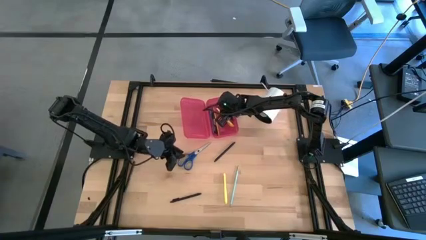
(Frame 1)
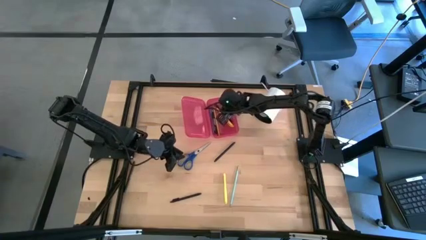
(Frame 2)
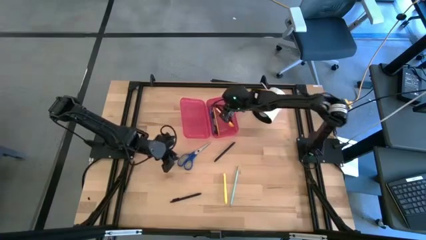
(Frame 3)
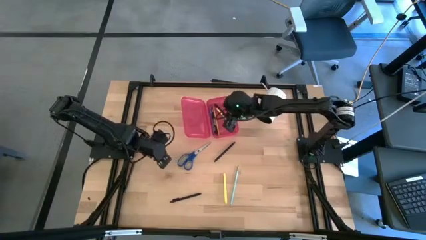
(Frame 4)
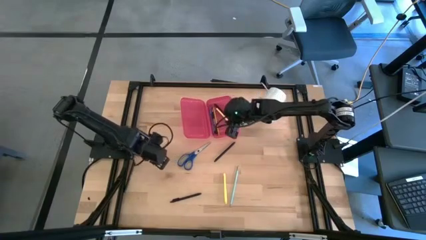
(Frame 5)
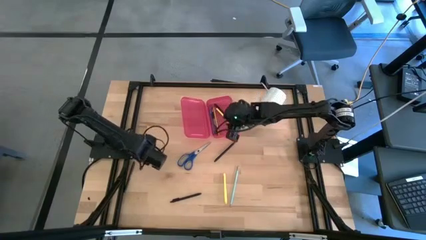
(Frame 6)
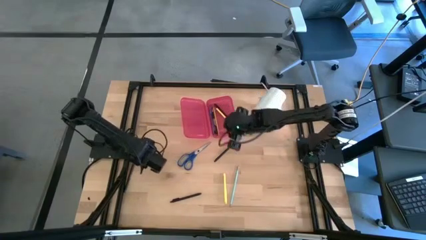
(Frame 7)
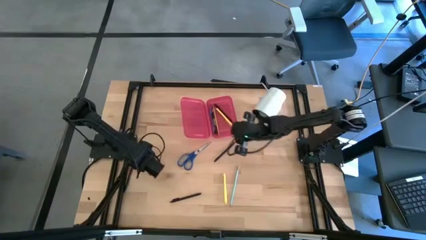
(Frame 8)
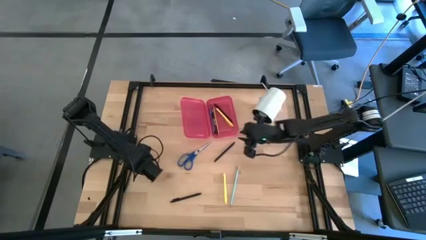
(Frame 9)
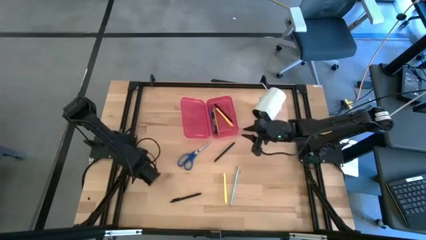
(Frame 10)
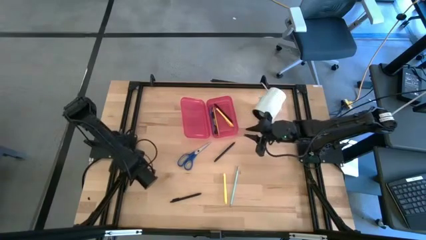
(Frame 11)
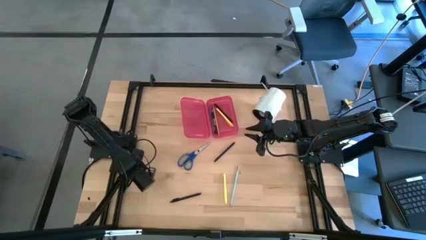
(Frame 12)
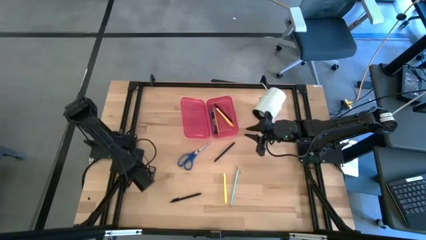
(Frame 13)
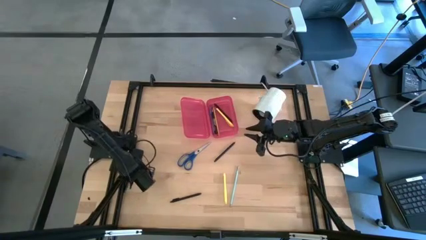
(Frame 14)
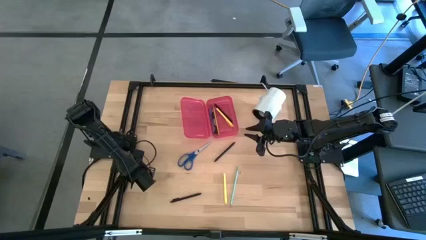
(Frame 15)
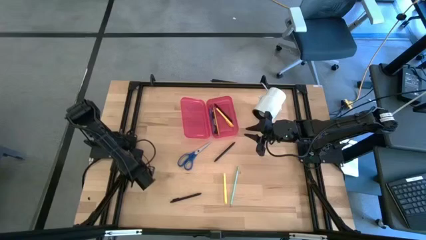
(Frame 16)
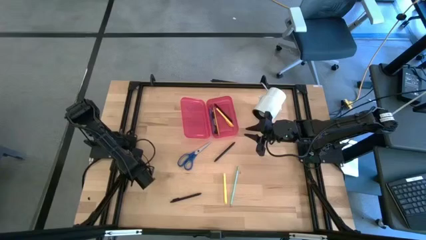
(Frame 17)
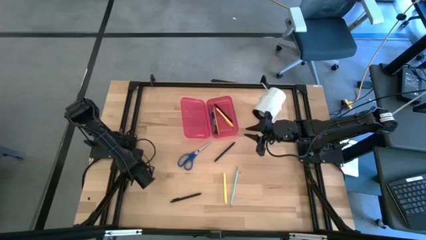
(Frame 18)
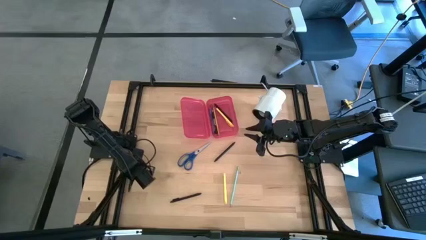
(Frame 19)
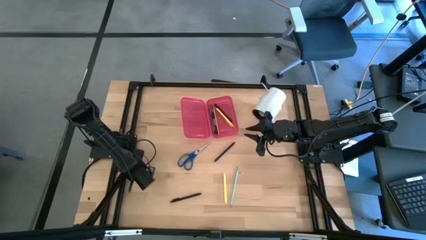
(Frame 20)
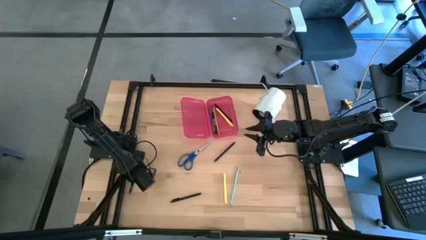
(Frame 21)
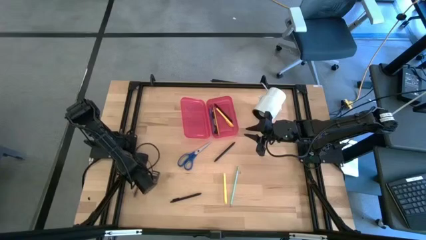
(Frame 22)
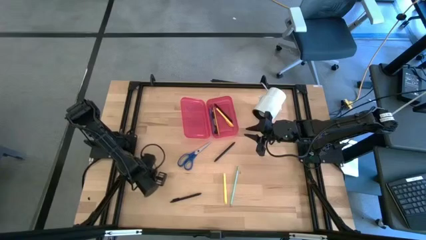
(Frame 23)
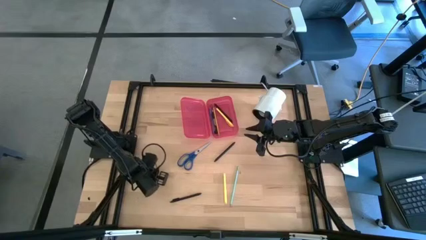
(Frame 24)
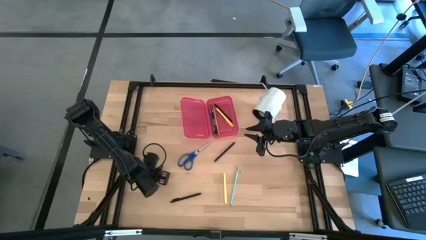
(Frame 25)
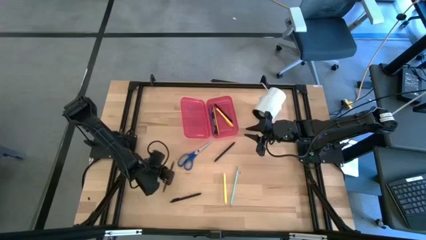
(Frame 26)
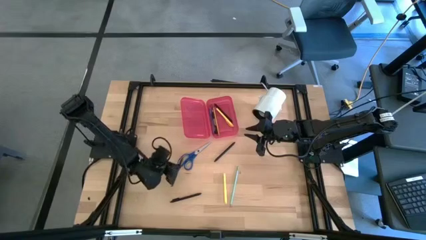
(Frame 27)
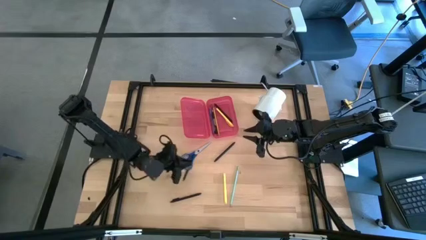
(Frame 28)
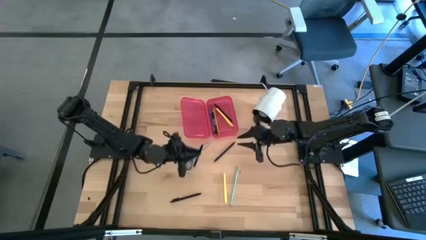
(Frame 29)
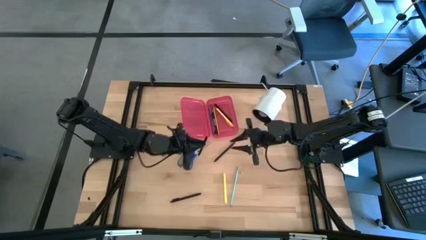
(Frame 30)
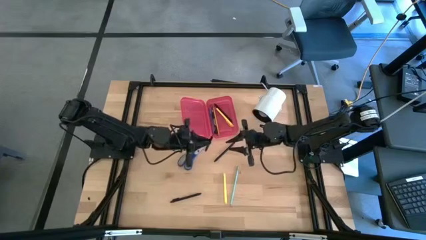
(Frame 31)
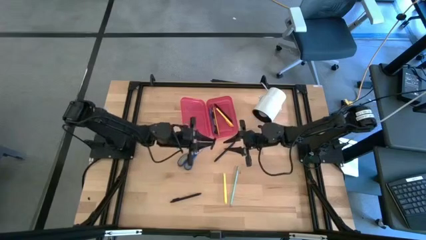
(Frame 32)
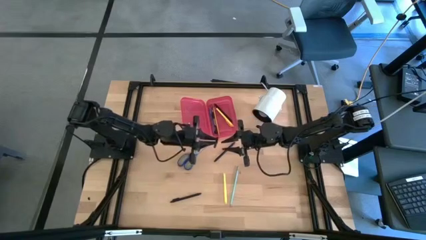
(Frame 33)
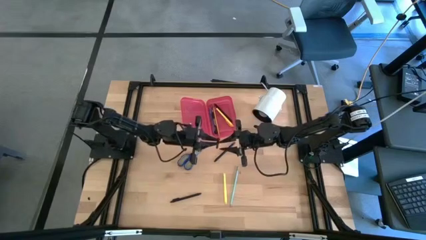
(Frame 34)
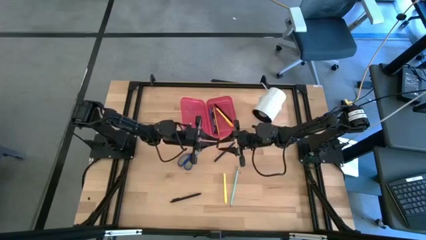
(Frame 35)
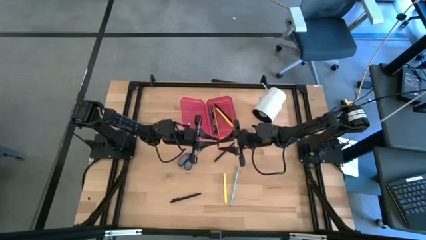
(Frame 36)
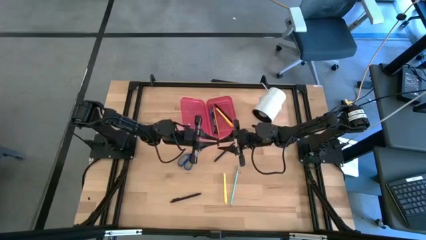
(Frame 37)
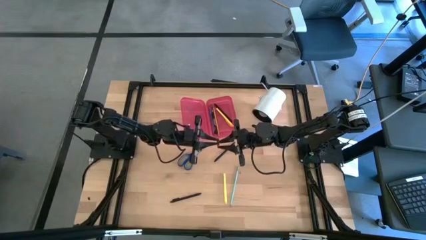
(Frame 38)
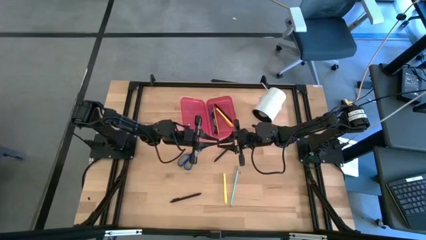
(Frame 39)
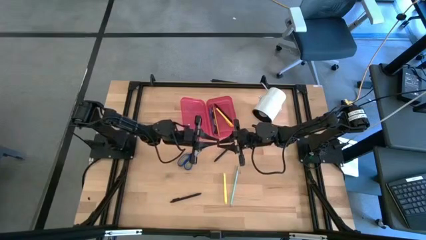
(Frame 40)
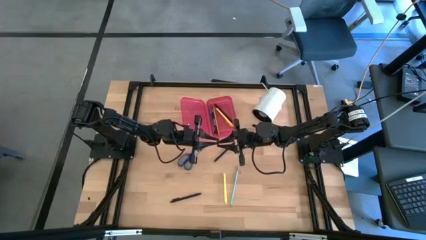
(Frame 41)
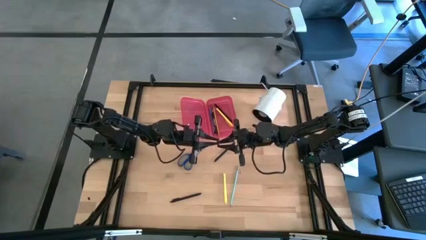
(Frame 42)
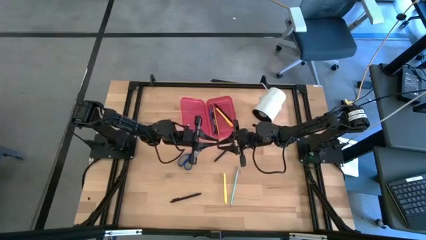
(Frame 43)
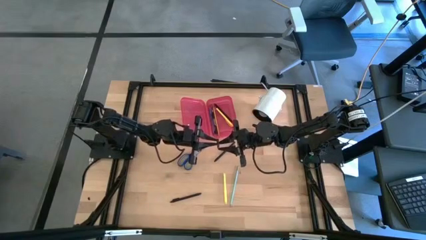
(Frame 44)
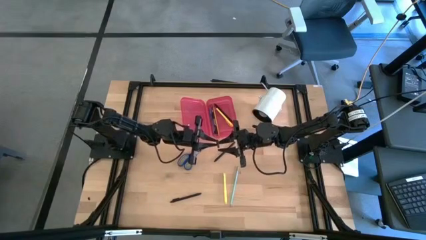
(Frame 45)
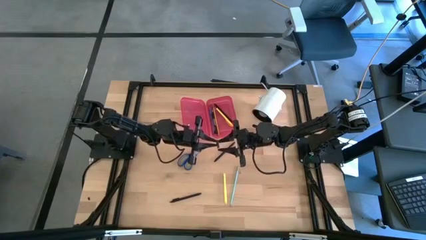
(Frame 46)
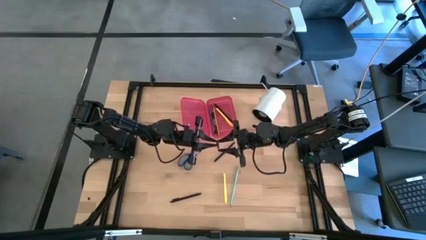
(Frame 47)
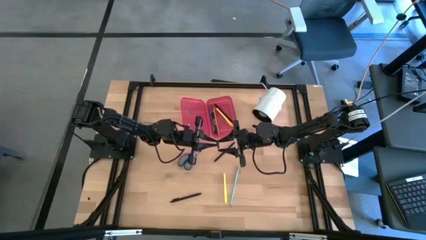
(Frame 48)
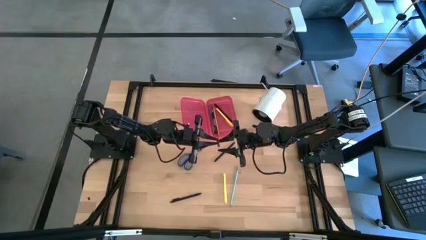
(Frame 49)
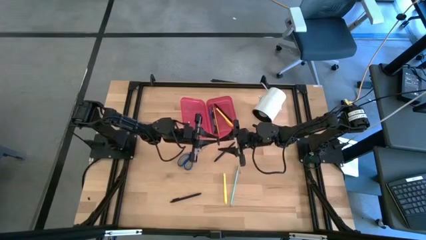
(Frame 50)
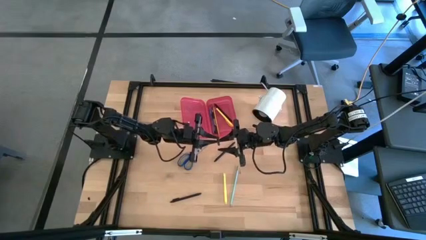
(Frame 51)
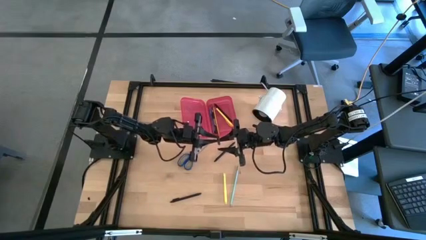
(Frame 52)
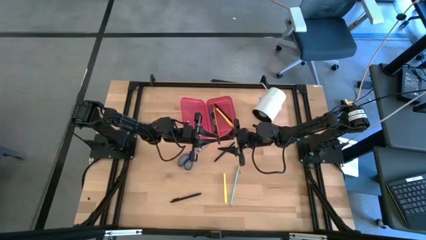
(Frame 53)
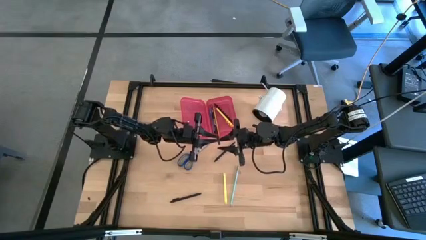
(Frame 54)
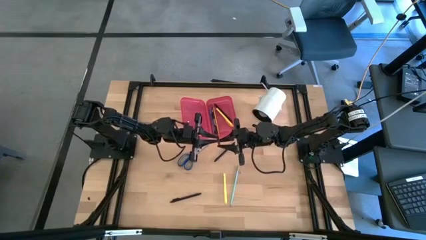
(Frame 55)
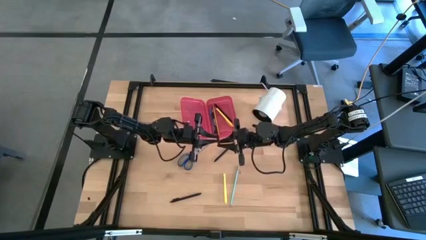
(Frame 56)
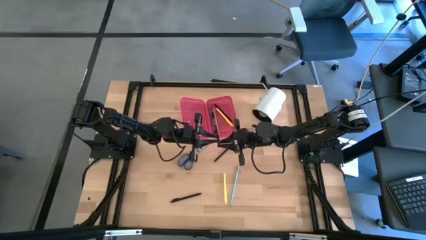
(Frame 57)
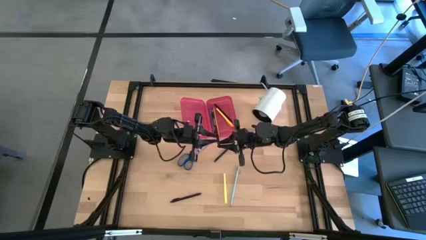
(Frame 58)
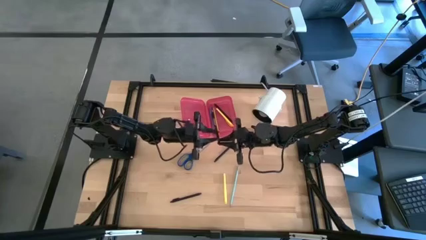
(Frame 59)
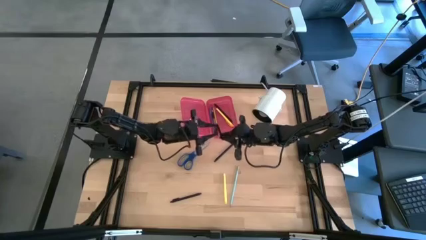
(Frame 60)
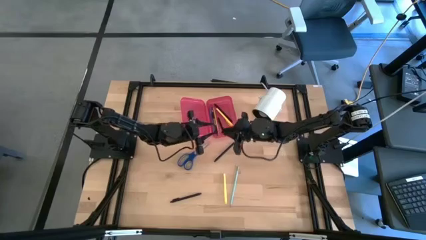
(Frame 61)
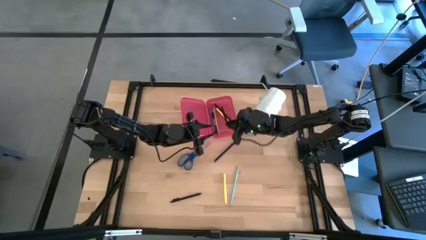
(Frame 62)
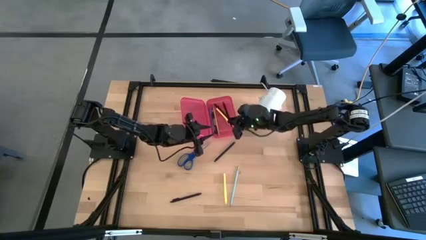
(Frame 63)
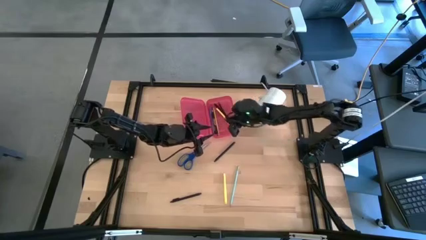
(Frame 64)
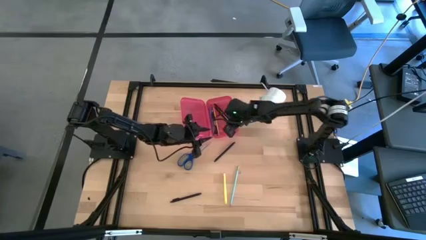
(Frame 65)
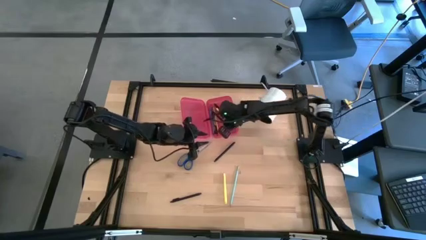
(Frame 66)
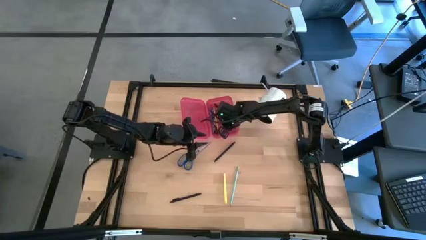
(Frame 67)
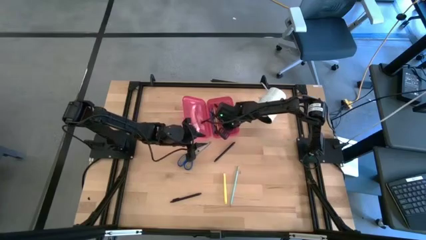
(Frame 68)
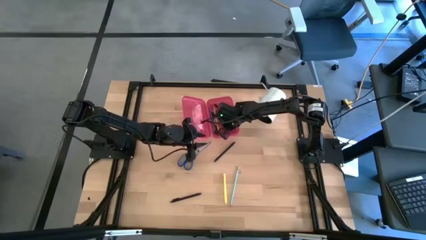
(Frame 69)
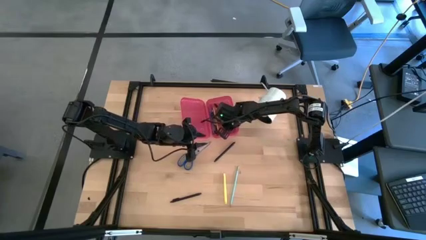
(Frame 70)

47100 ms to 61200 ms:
Task: Pick & place school supplies into a supply box
Put the black pen into the red supply box
